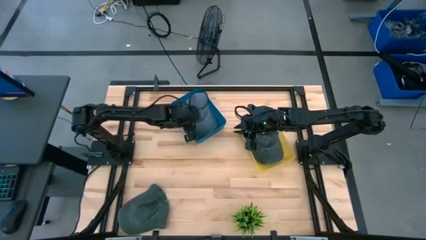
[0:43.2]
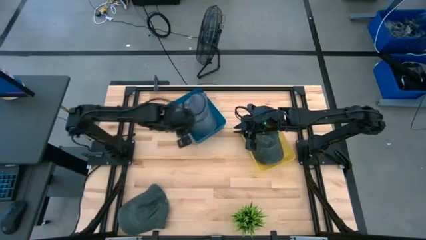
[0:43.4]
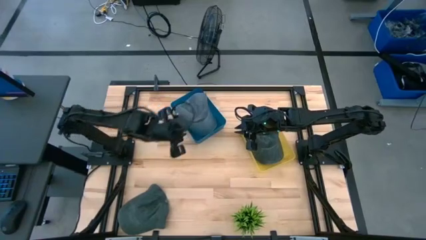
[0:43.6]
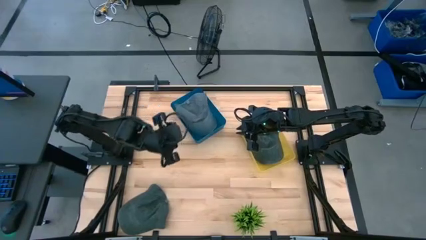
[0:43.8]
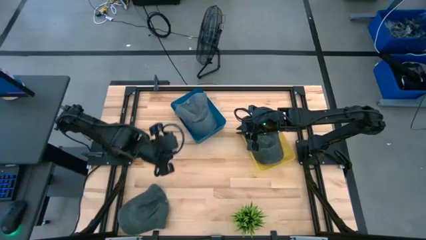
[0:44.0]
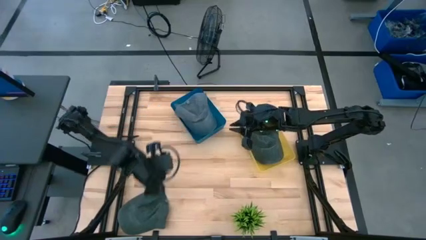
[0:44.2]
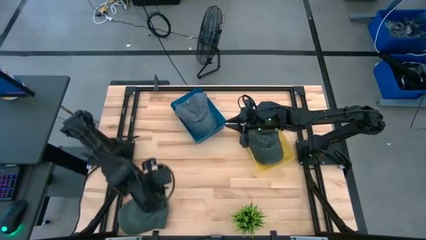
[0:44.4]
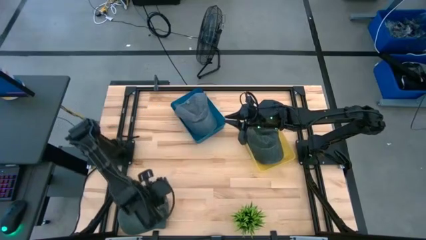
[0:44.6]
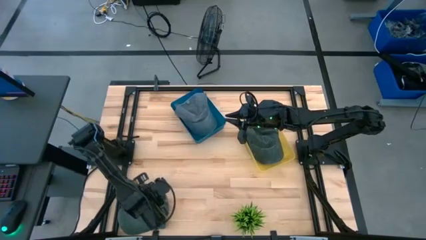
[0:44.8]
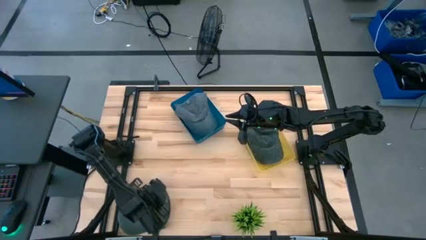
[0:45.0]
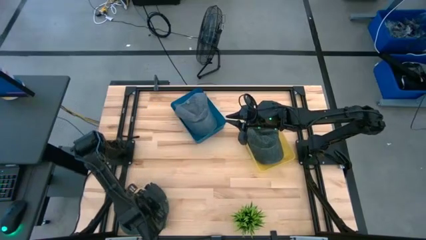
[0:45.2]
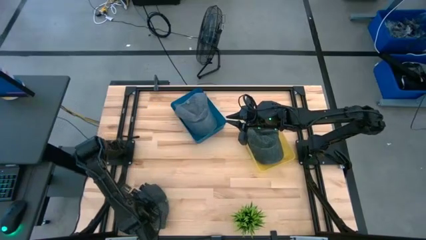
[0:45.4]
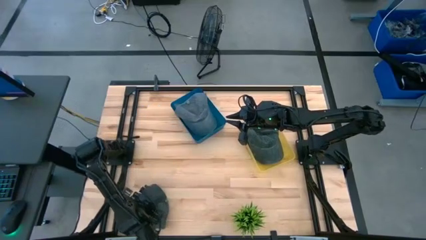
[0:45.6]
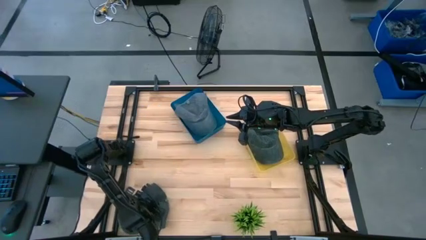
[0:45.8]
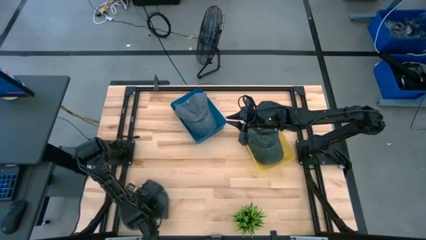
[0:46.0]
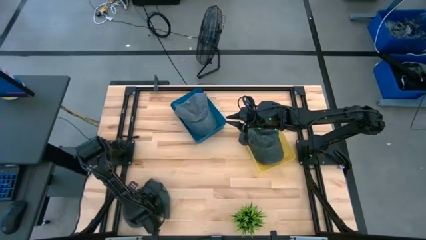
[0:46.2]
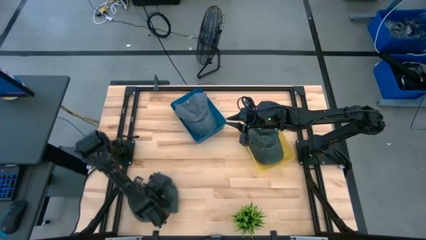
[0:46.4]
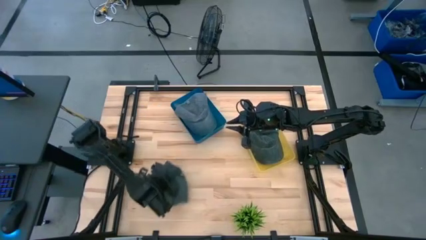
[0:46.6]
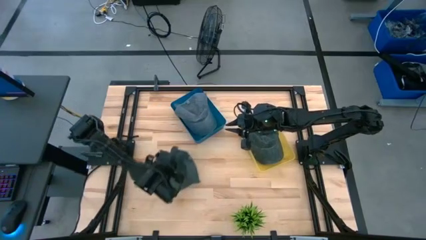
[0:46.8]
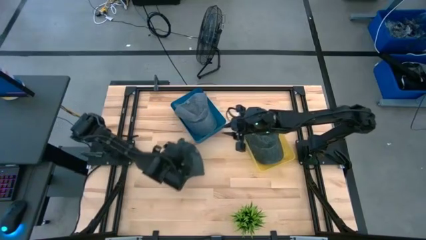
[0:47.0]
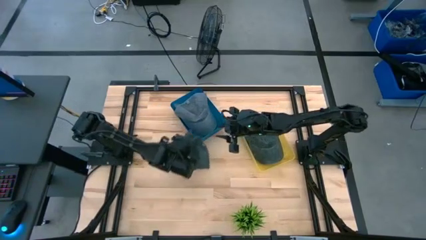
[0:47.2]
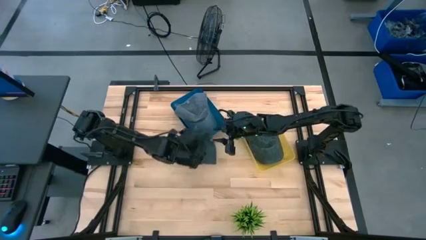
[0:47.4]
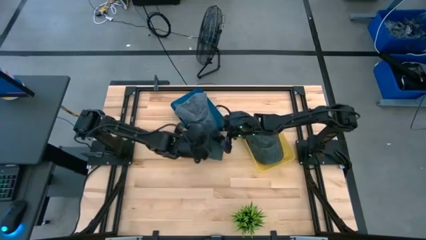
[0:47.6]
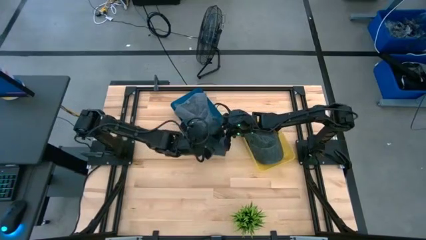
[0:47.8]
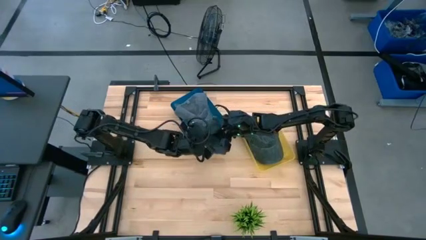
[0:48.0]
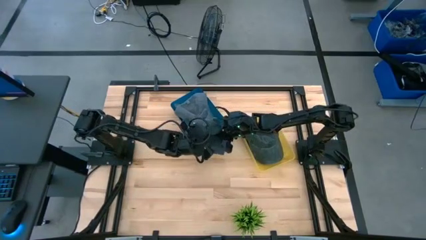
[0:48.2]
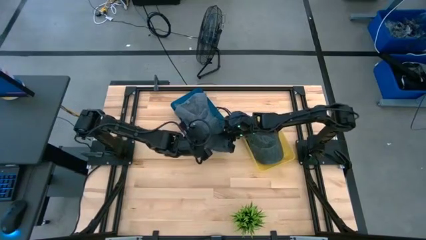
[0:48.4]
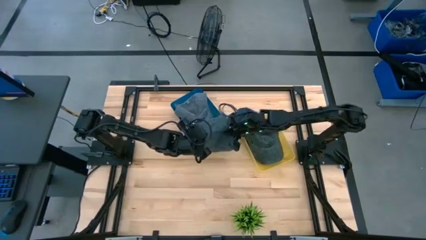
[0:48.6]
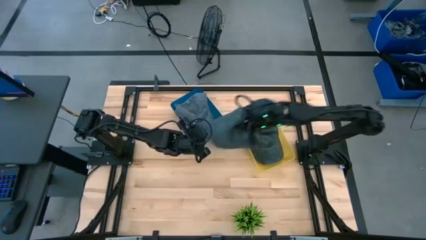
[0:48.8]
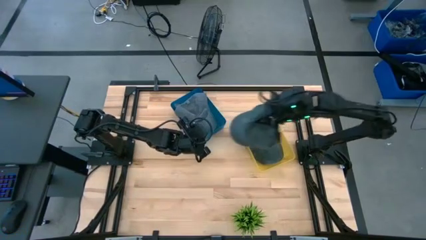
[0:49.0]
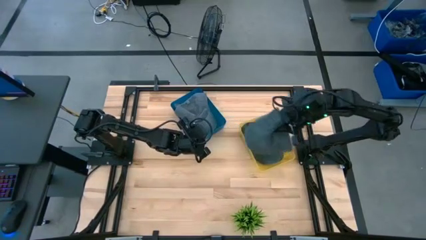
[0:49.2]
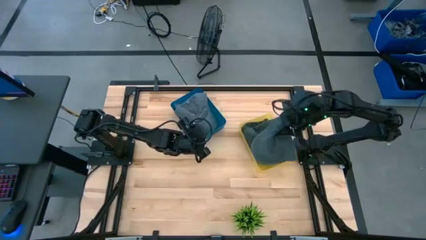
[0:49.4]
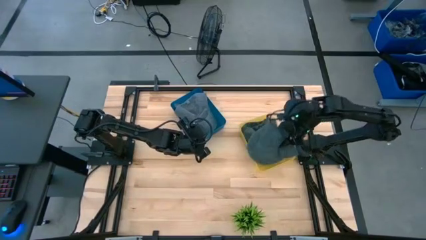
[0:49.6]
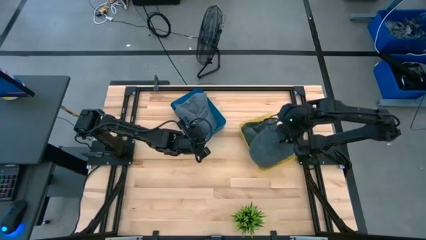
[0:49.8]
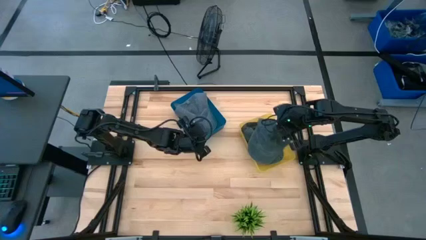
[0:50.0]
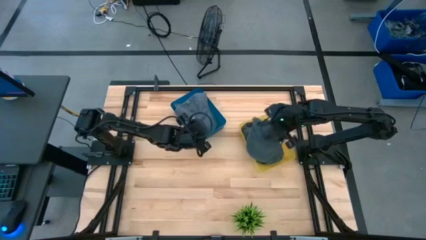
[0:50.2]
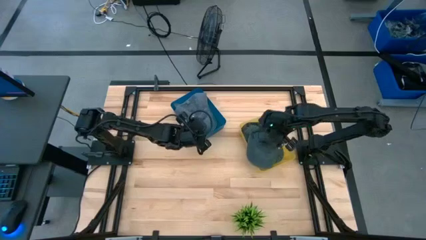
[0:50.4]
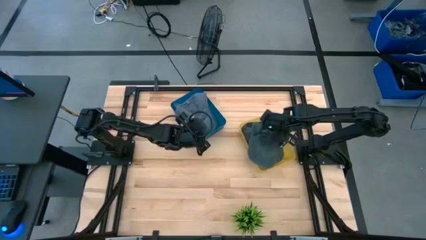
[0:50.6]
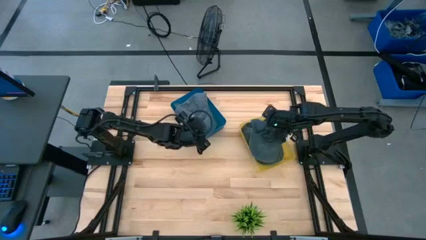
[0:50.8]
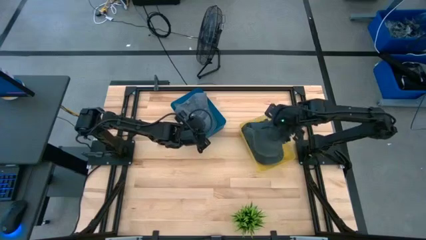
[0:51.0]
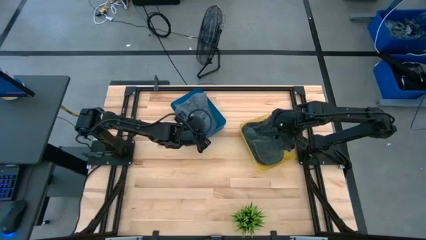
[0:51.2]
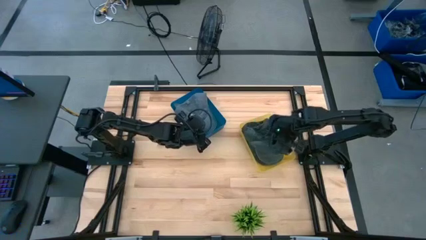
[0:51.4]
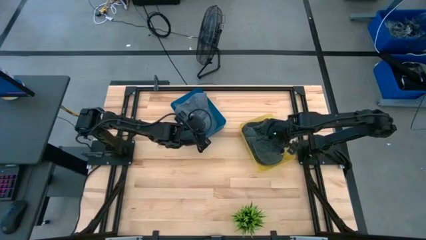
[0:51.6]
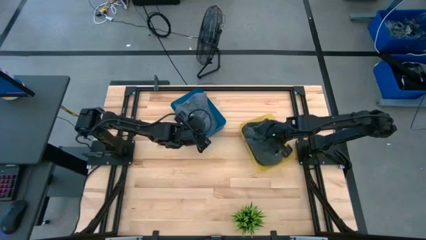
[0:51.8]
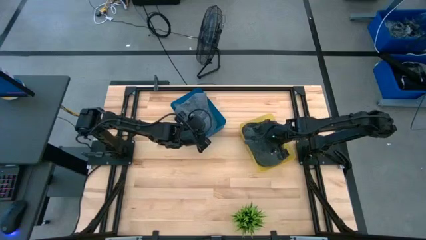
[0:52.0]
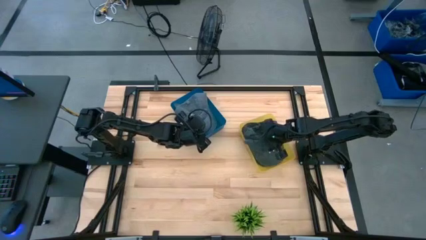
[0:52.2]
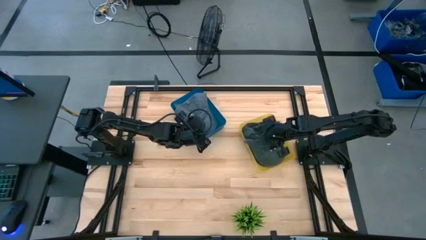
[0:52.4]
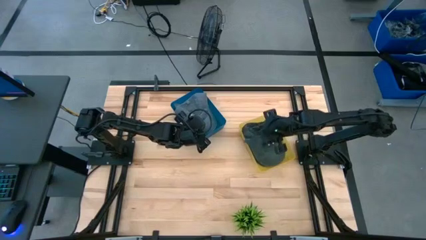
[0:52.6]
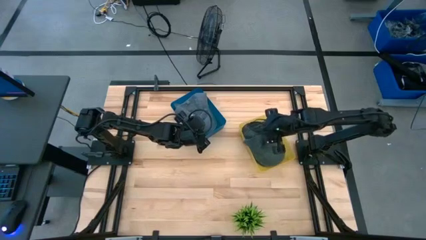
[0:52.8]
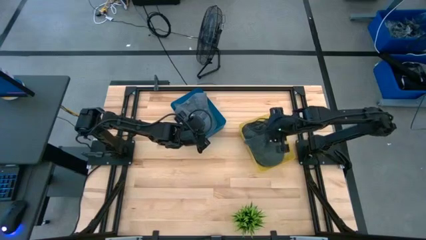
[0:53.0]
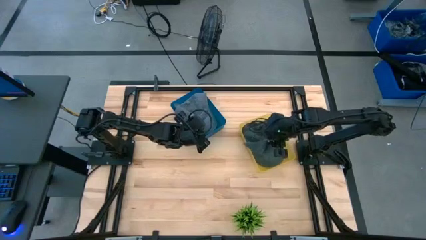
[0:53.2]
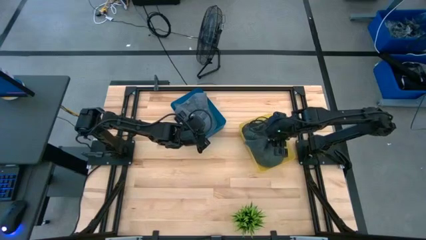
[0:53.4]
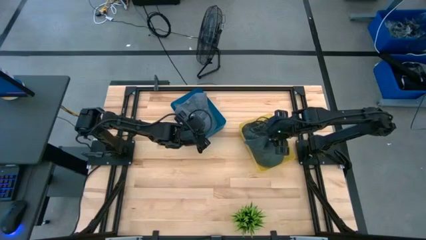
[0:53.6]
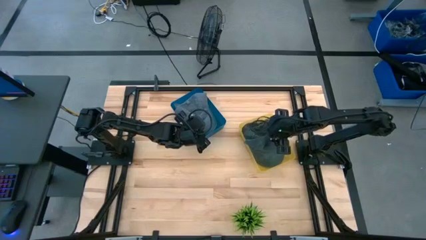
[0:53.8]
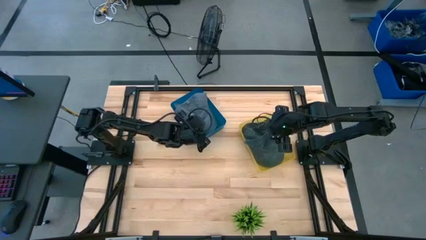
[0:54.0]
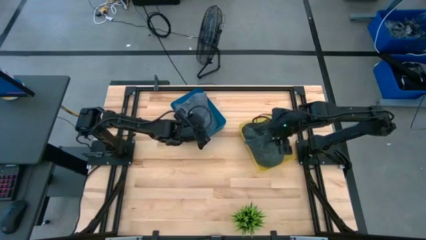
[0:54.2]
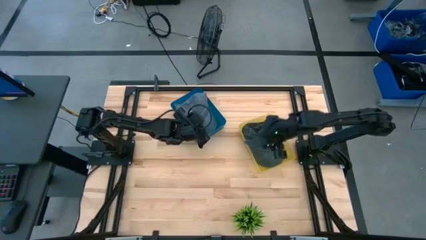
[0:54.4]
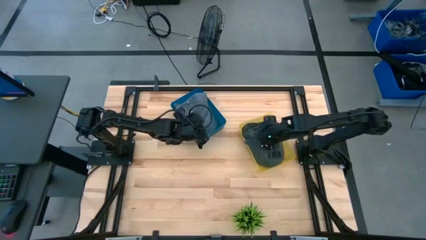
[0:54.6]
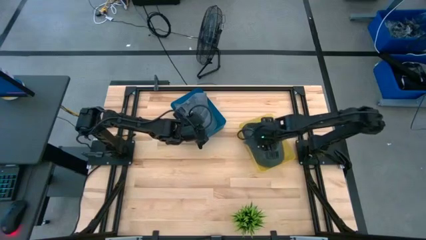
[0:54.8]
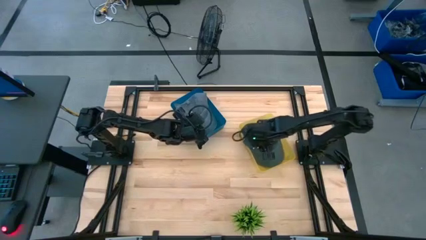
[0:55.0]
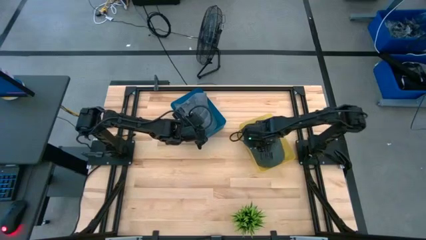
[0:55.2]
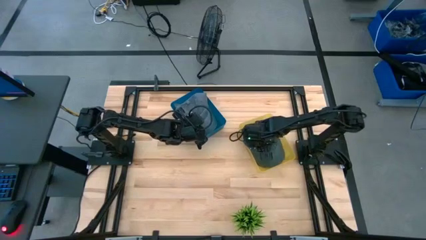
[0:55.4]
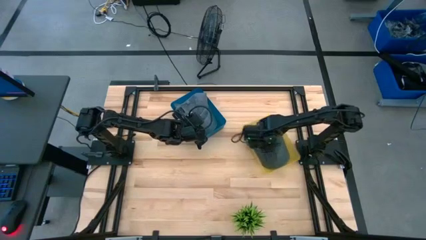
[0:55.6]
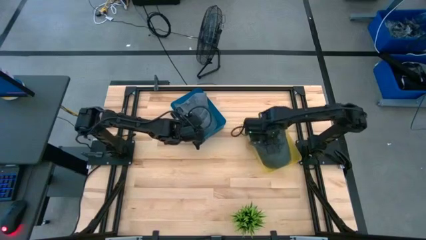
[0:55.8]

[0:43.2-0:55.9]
Task: Pick & Place hat
Put the black cap into the yellow bin

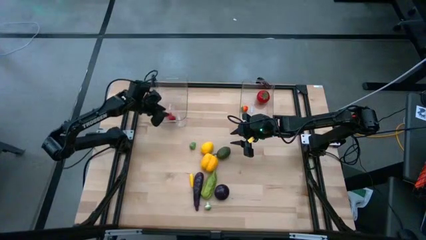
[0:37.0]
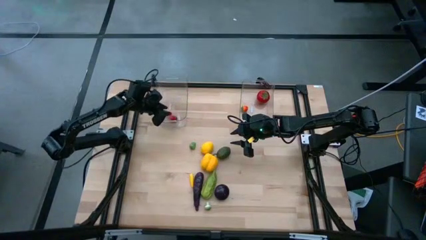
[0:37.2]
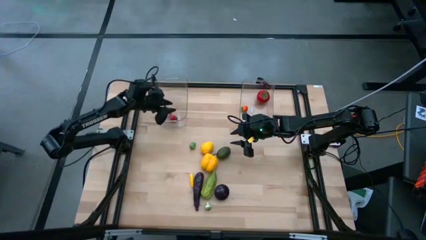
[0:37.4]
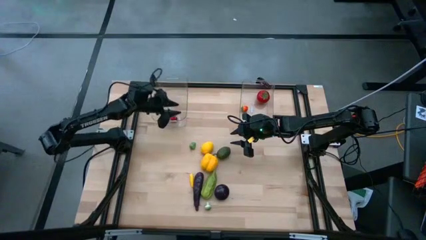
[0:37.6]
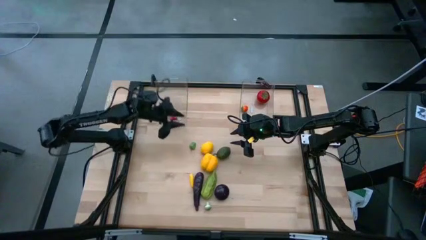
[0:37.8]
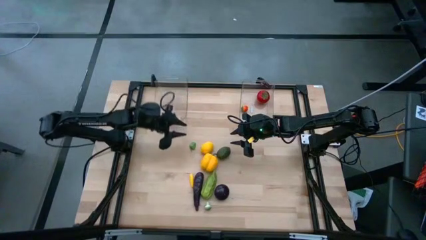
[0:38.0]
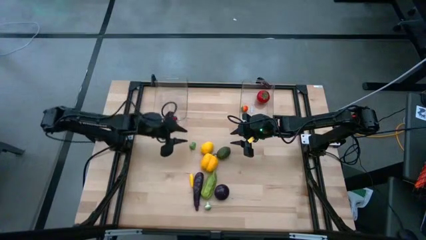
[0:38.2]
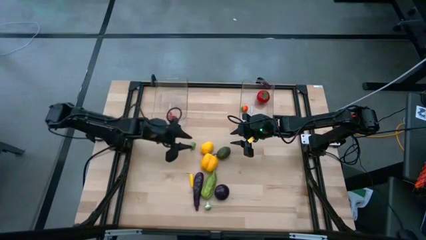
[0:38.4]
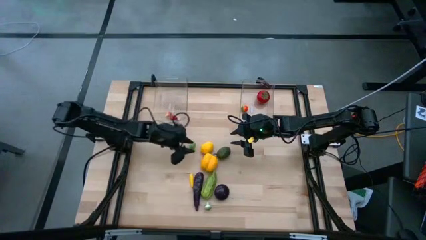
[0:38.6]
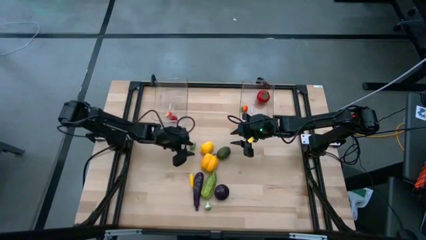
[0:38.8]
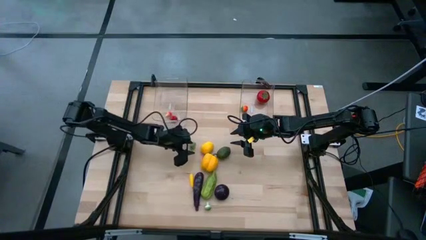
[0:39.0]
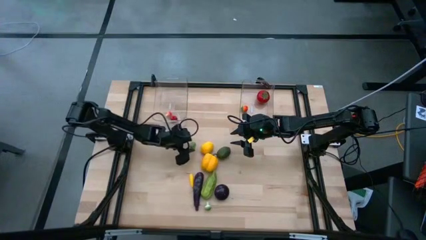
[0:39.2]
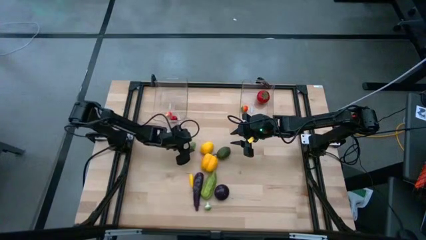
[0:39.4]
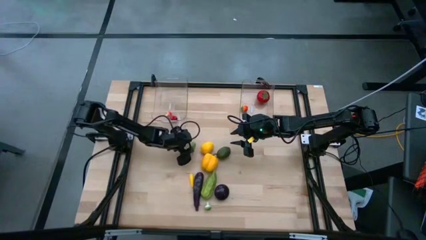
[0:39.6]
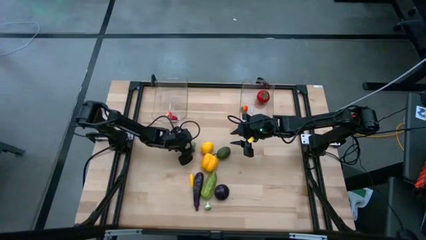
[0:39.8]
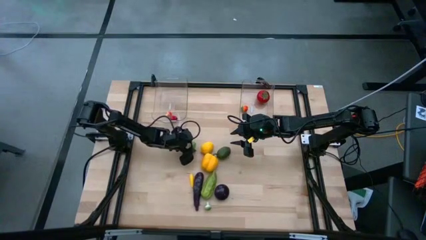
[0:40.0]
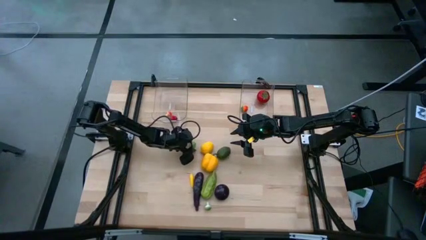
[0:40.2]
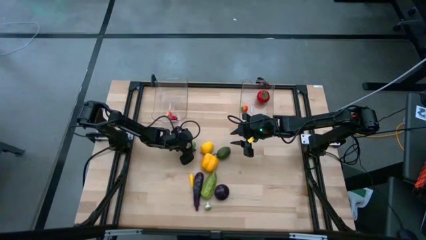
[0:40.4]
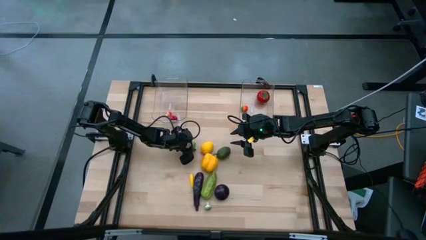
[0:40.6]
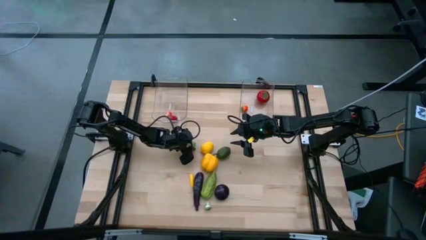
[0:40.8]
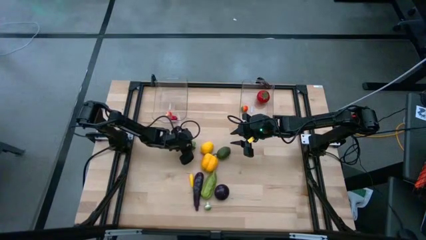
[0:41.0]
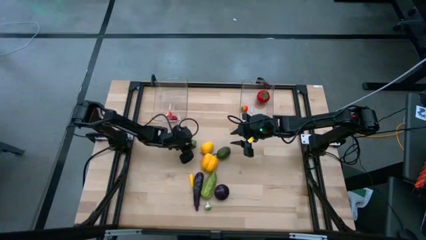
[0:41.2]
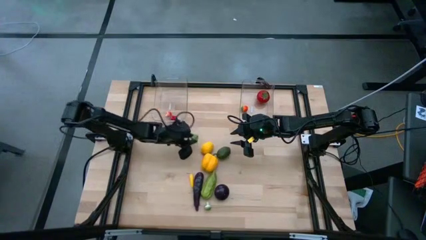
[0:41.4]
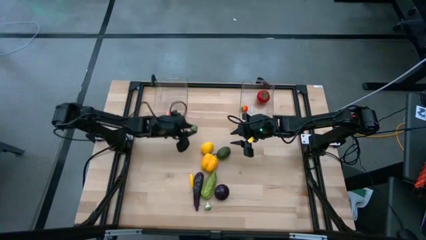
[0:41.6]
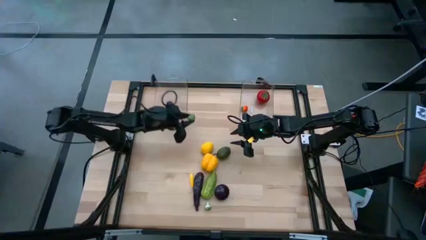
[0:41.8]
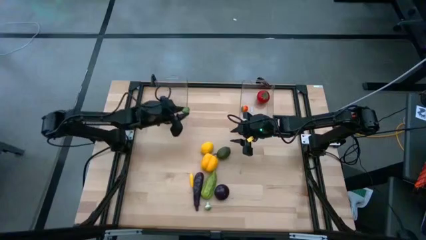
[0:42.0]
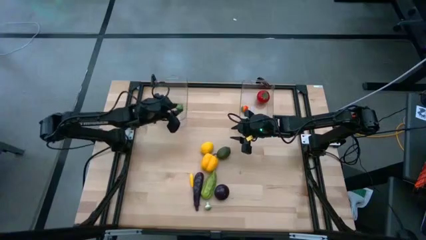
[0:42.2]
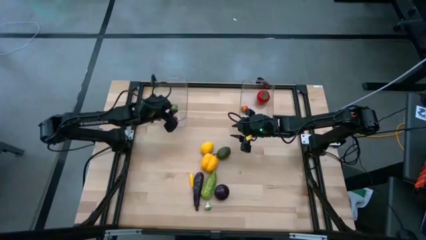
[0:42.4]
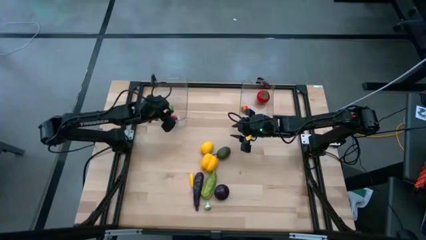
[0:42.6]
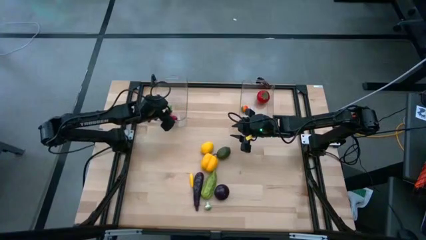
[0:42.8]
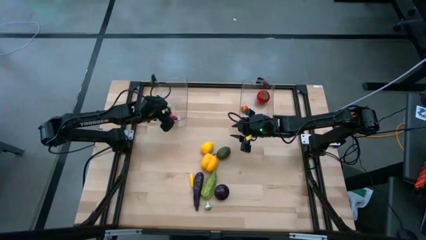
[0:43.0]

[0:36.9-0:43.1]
Task: Sort produce into baskets
Put the green chili pepper into the left transparent bin
